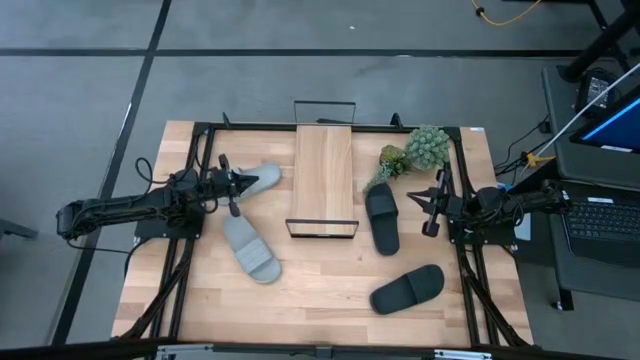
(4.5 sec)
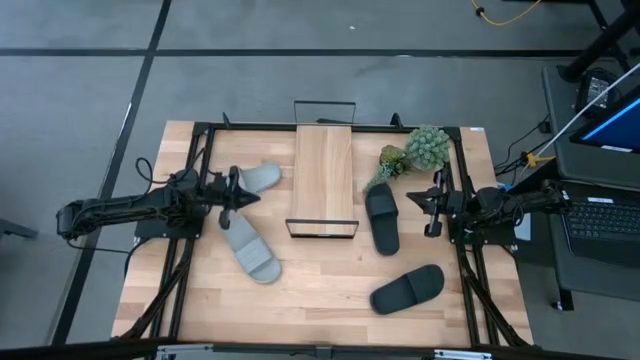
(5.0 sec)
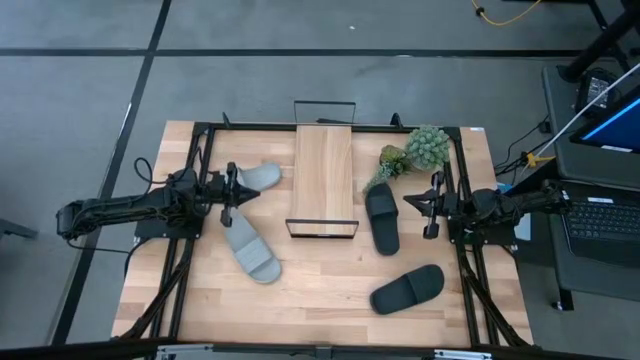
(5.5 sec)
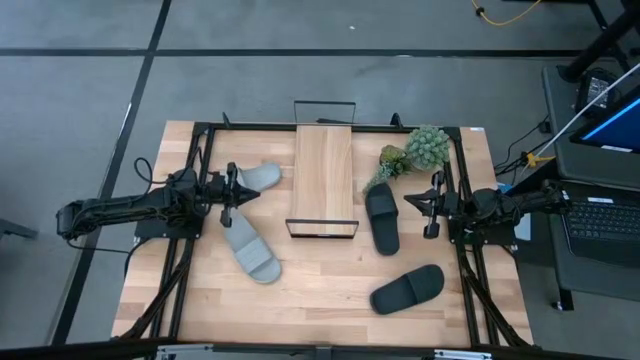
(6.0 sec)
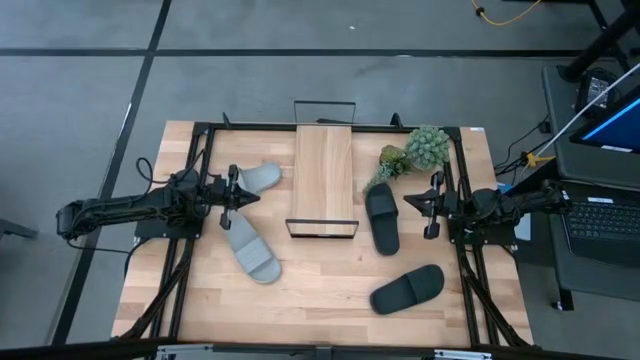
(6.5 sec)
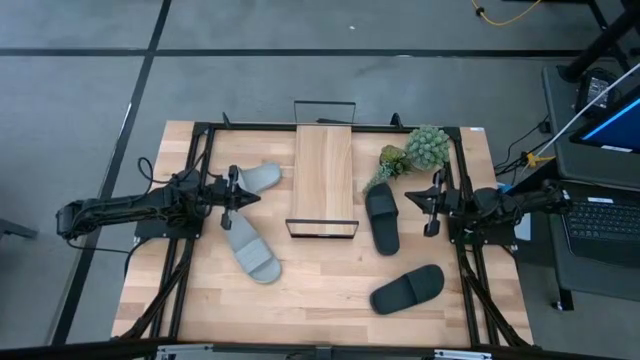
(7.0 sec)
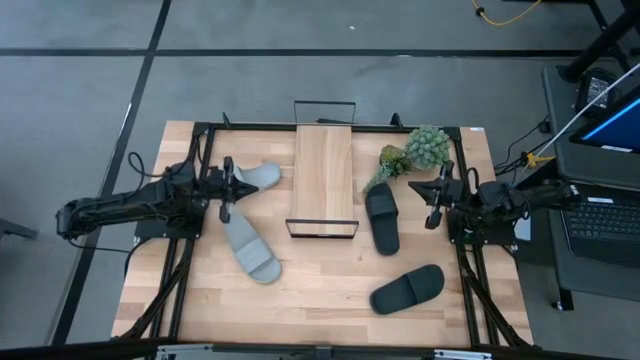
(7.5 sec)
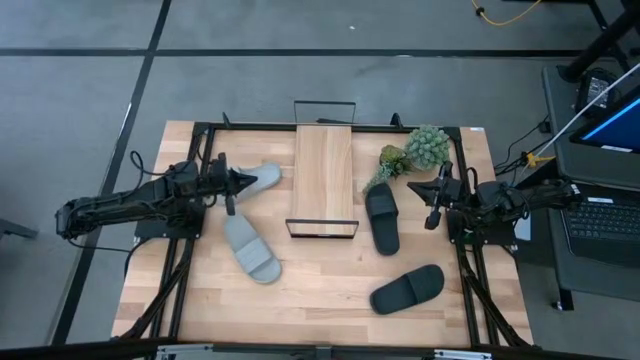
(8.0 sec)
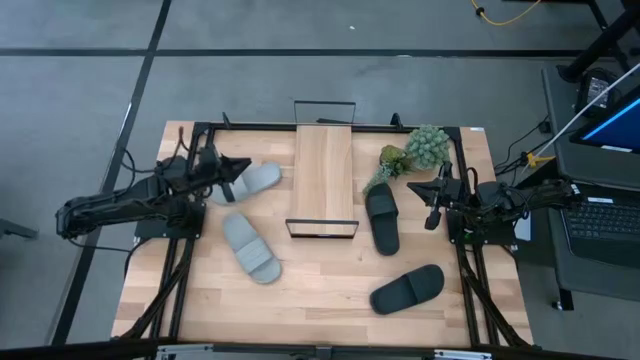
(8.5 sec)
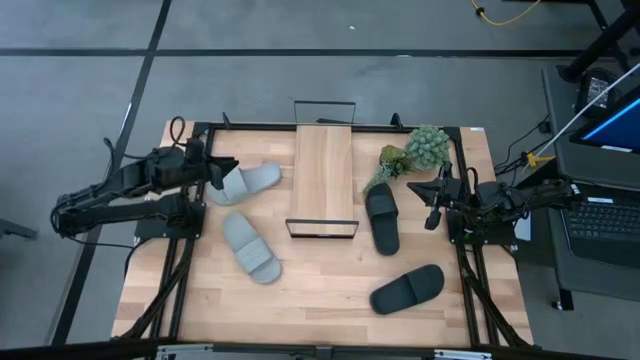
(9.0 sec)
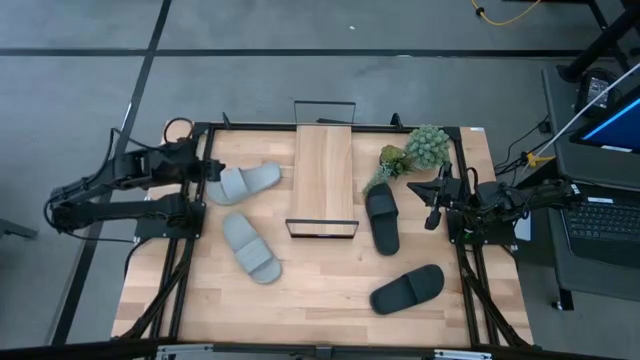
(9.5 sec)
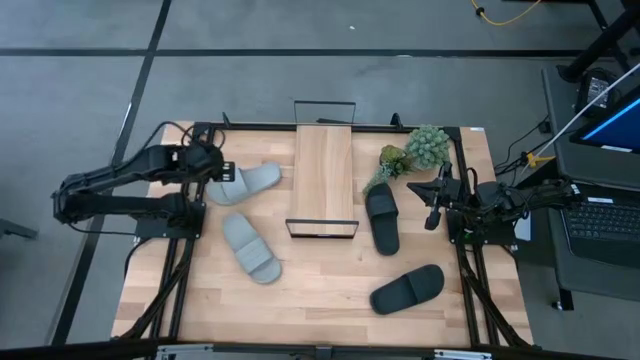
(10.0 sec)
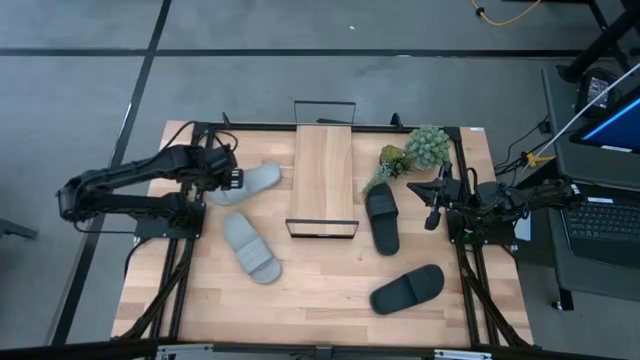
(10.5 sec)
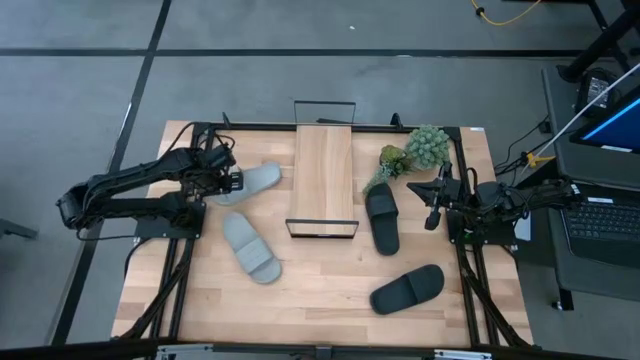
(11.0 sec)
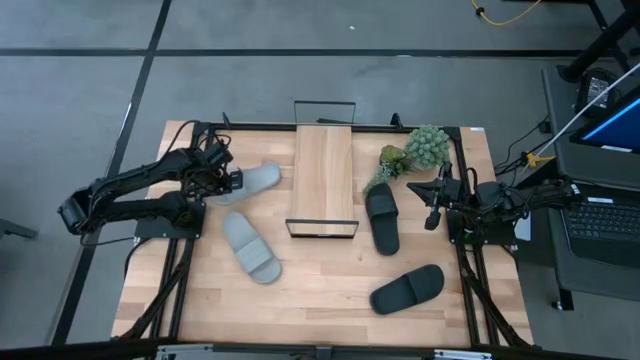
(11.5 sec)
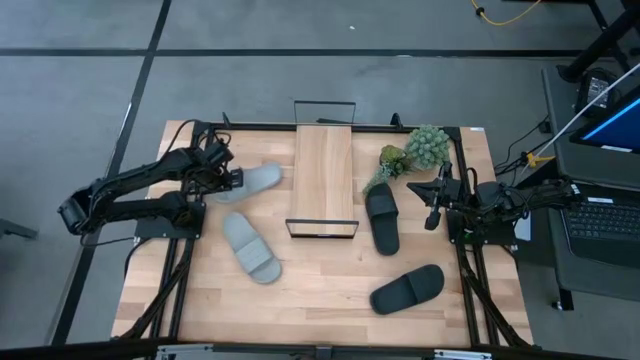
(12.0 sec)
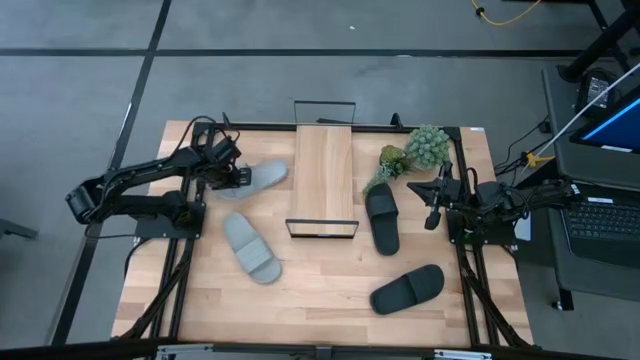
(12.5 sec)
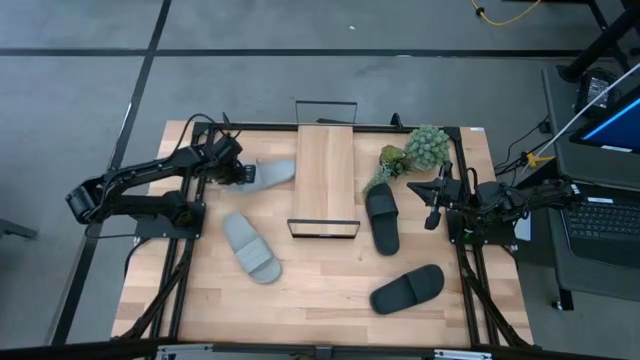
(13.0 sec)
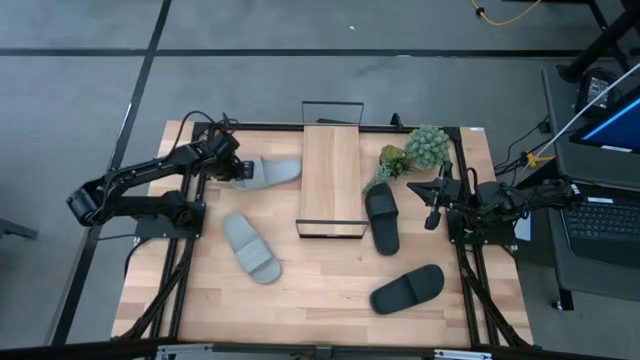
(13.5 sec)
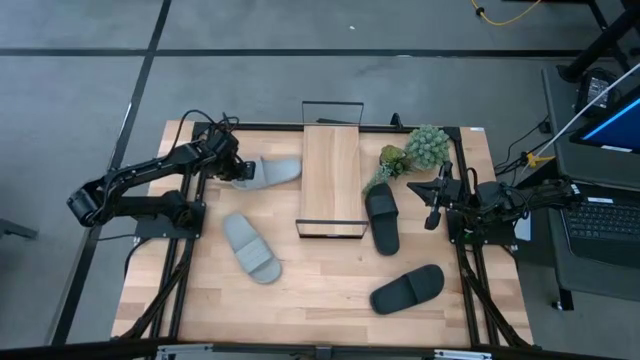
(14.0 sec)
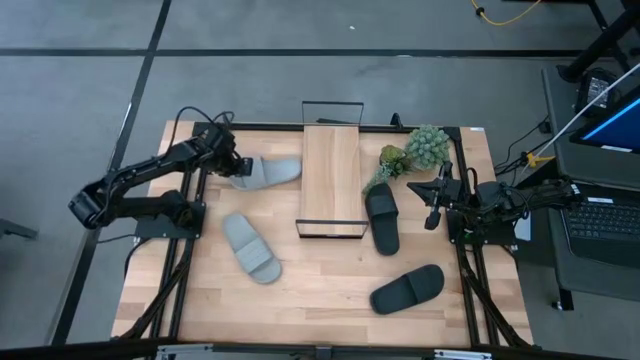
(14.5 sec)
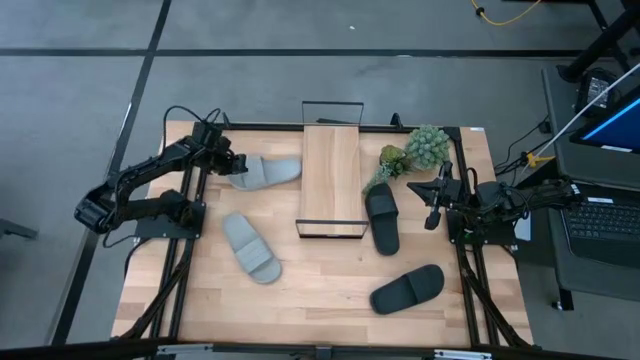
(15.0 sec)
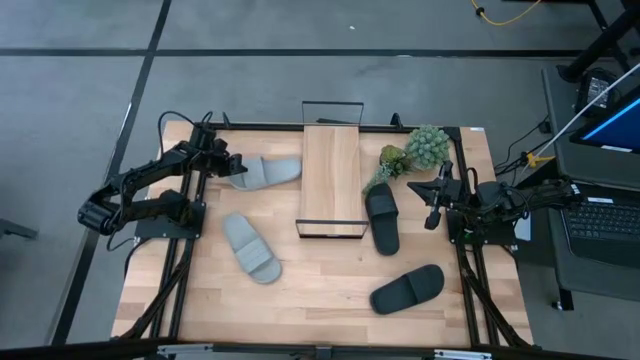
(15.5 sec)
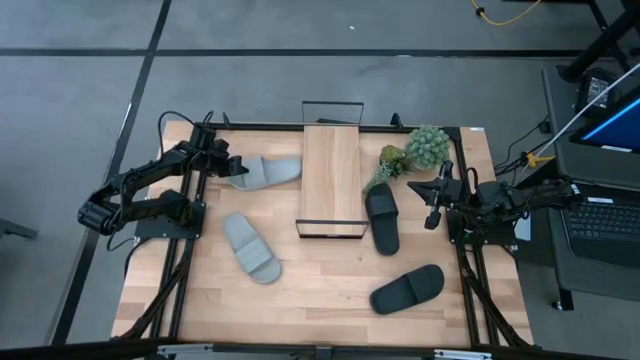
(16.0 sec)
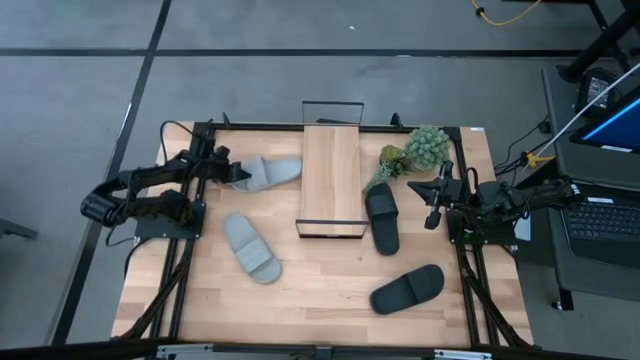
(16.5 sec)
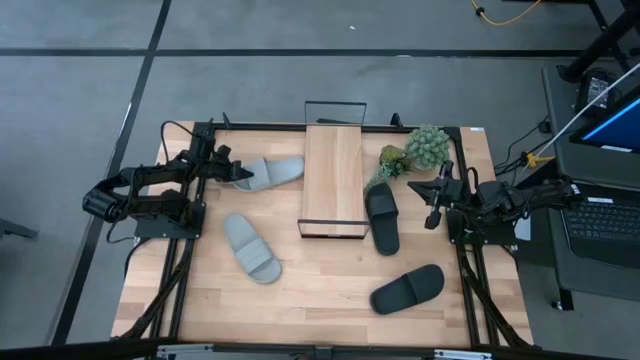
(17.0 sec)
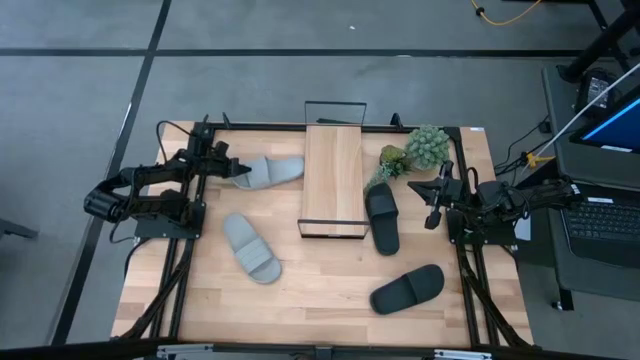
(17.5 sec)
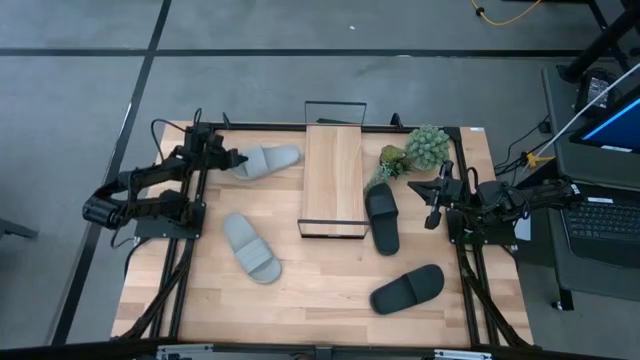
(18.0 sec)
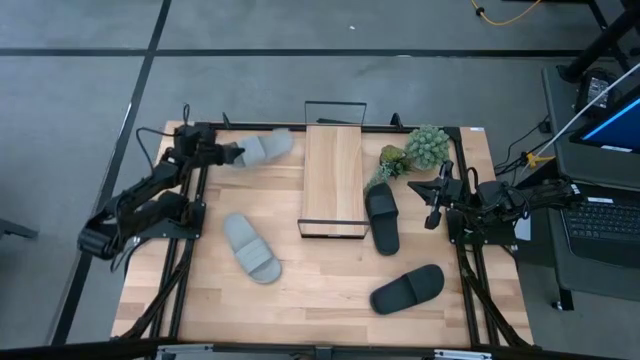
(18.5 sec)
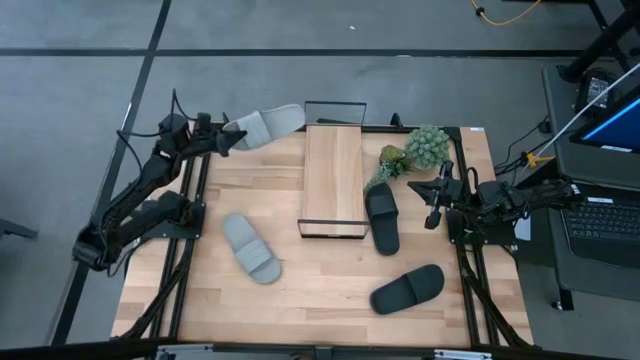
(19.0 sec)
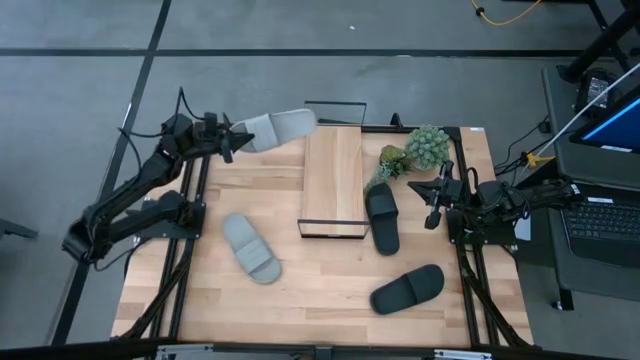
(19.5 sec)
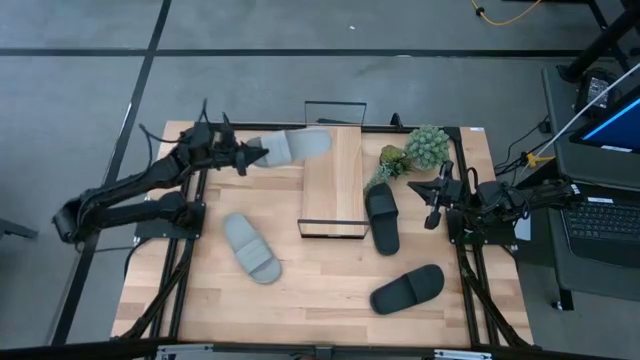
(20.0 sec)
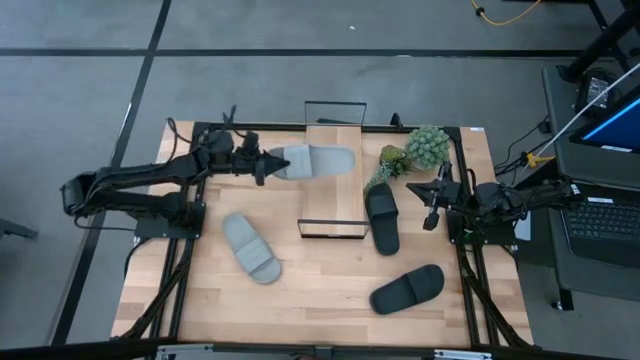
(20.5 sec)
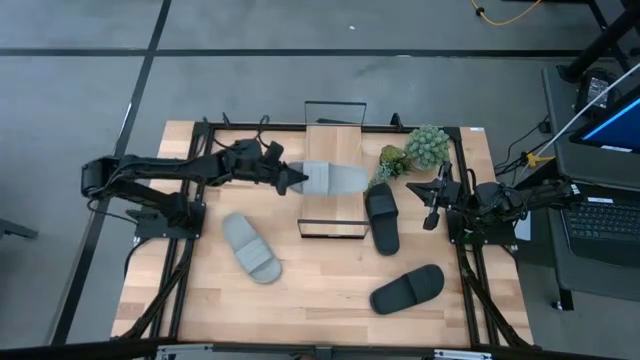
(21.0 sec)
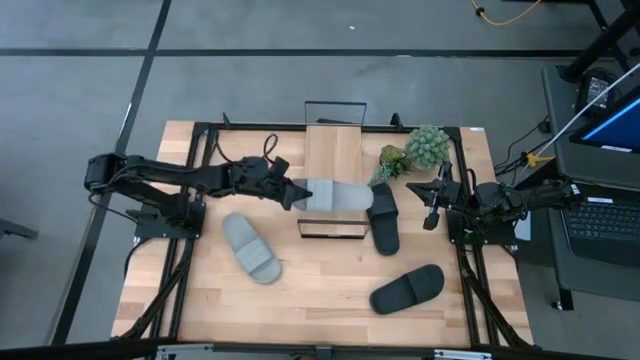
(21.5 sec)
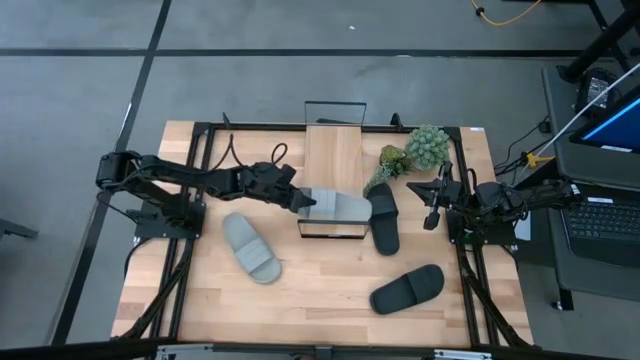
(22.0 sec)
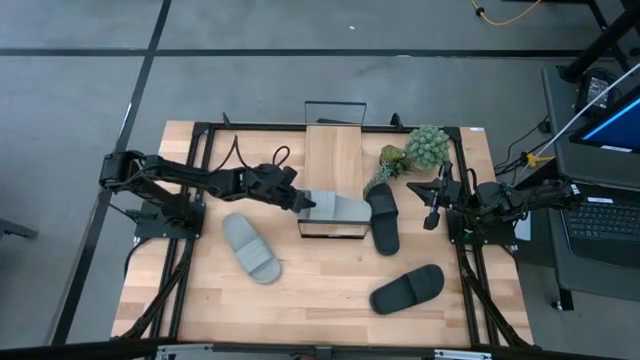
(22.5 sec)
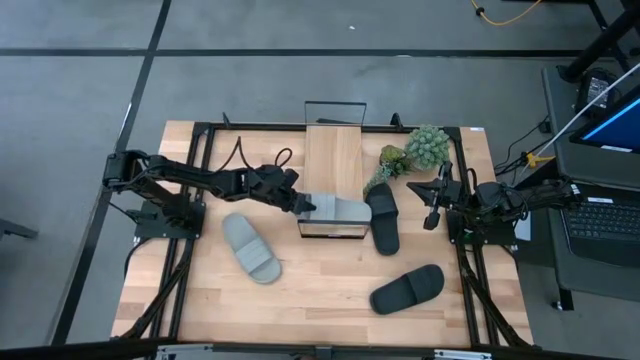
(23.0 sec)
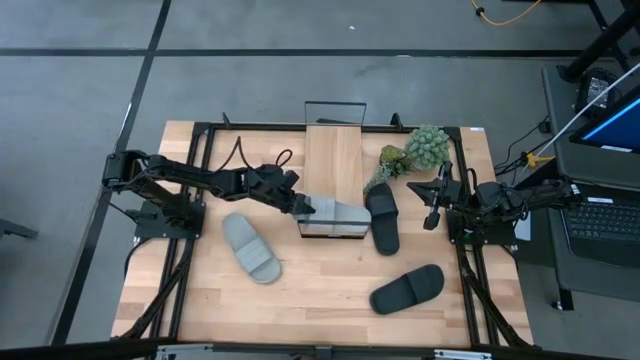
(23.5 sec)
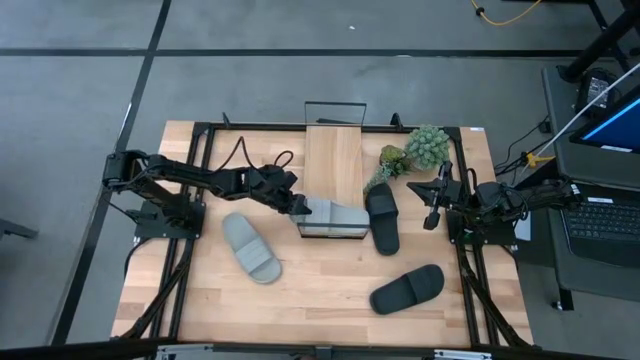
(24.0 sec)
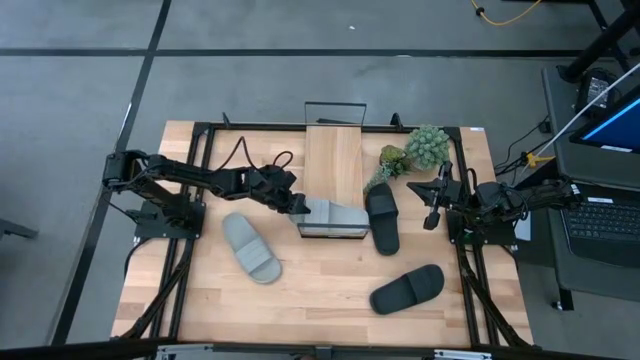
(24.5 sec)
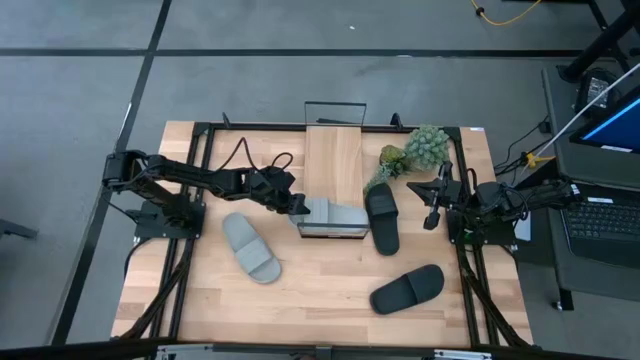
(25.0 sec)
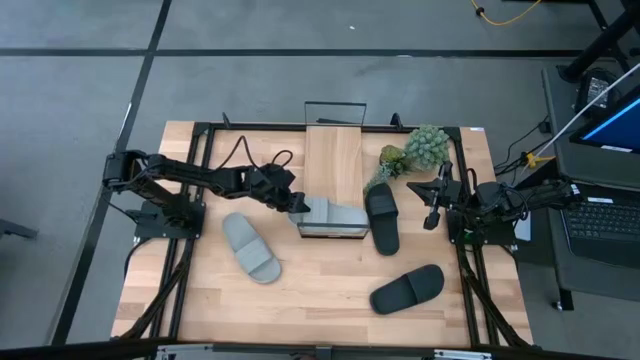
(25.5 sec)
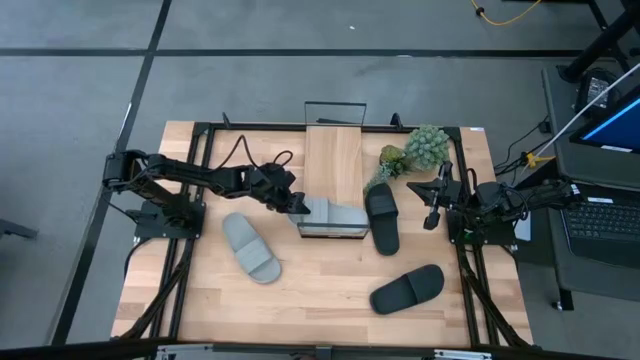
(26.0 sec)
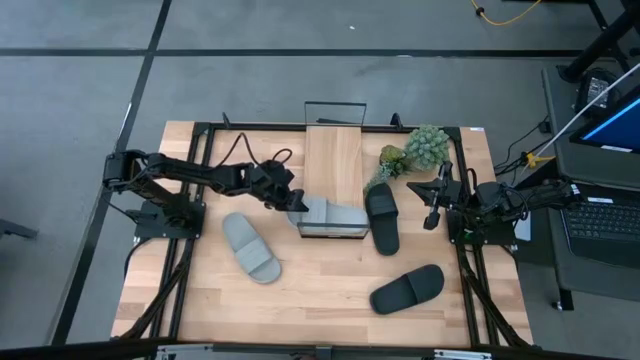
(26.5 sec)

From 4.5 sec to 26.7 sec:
Task: Pick and place slides into the shelf
Put the top gray slipper on the shelf
